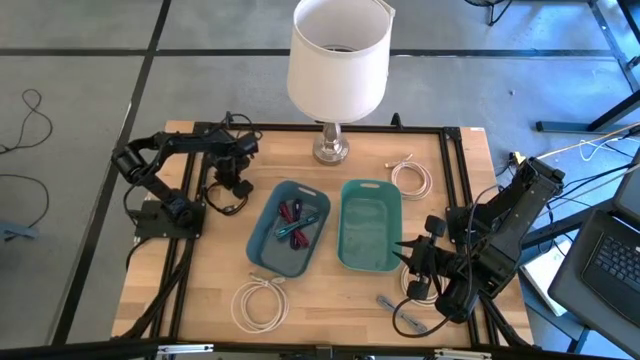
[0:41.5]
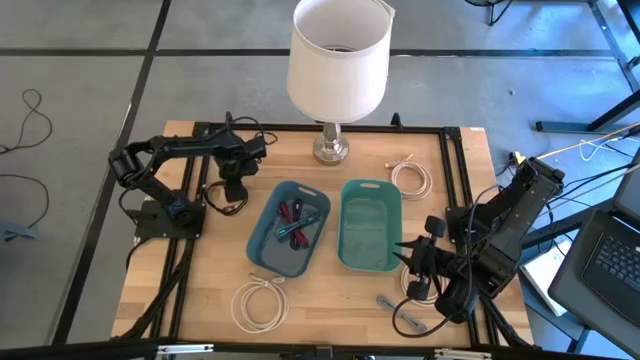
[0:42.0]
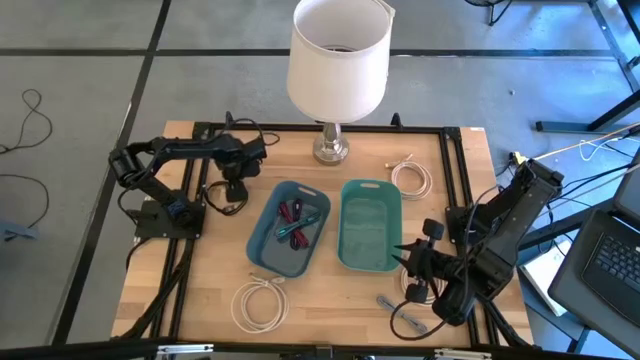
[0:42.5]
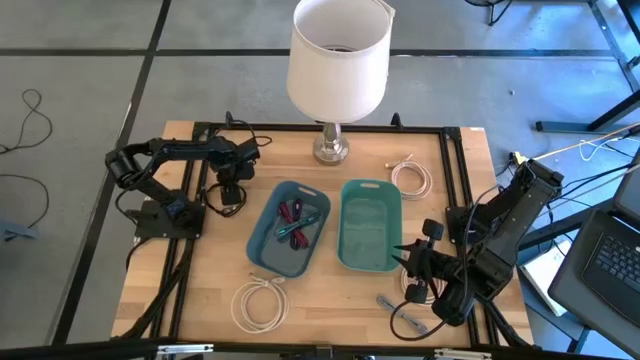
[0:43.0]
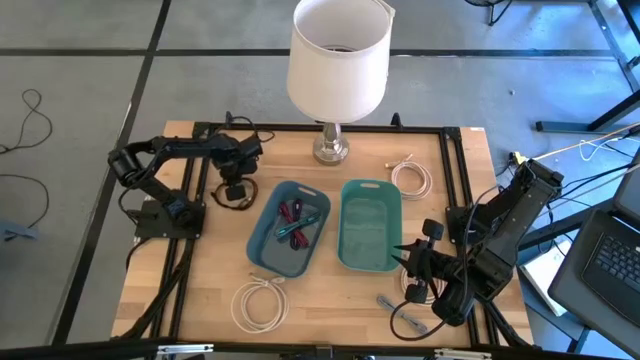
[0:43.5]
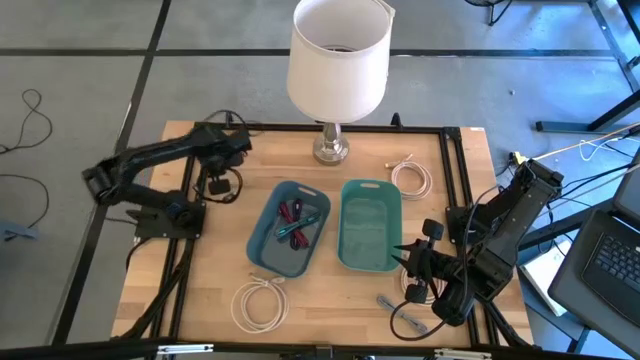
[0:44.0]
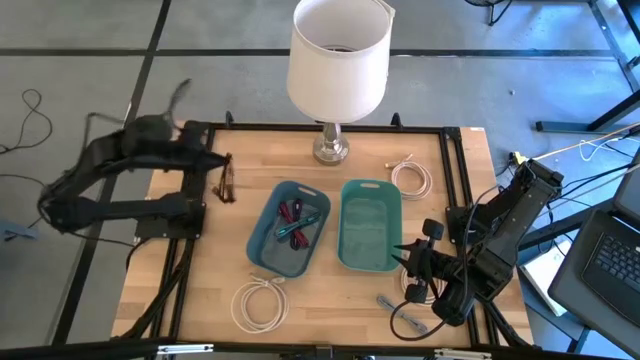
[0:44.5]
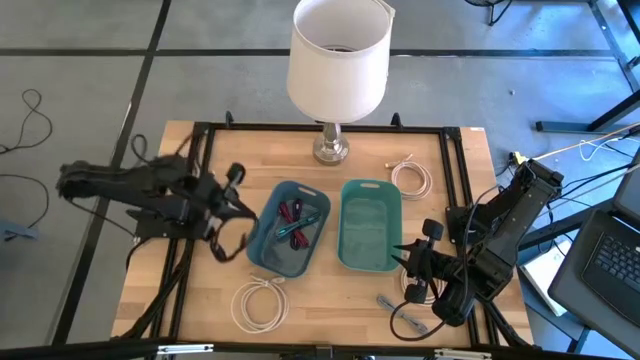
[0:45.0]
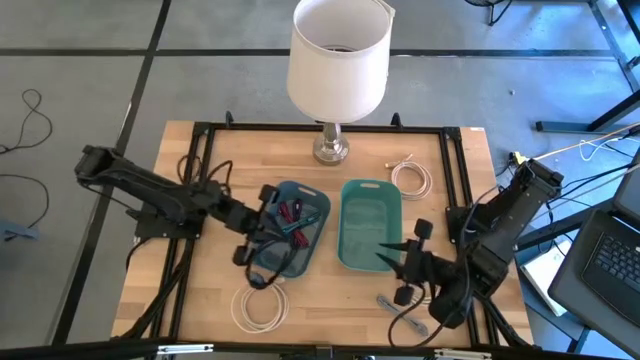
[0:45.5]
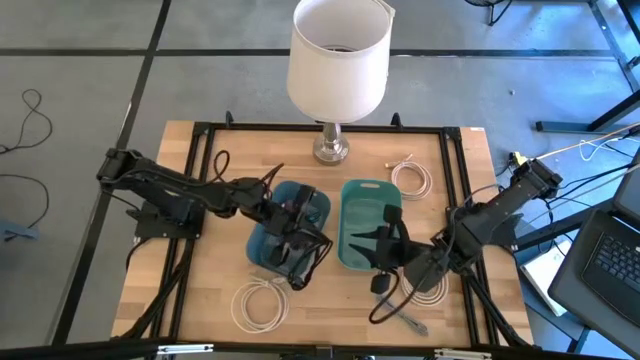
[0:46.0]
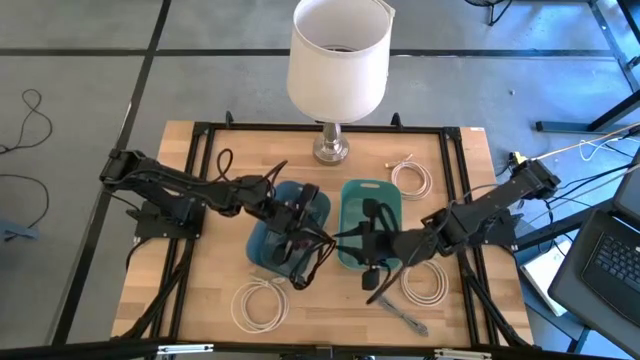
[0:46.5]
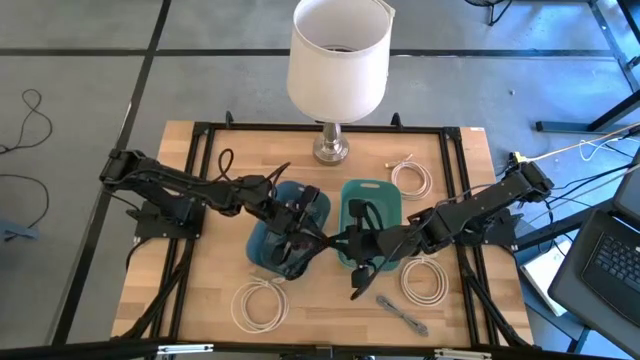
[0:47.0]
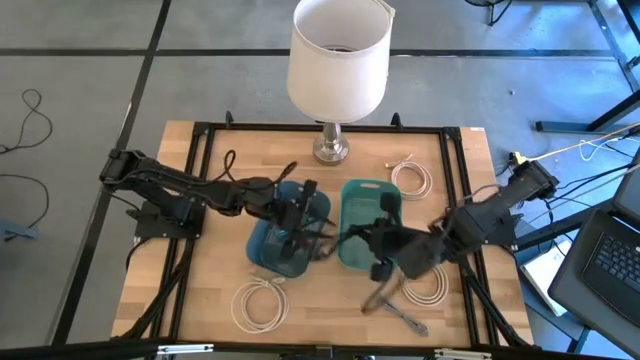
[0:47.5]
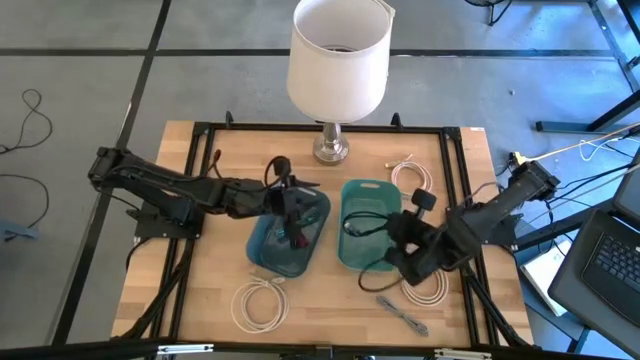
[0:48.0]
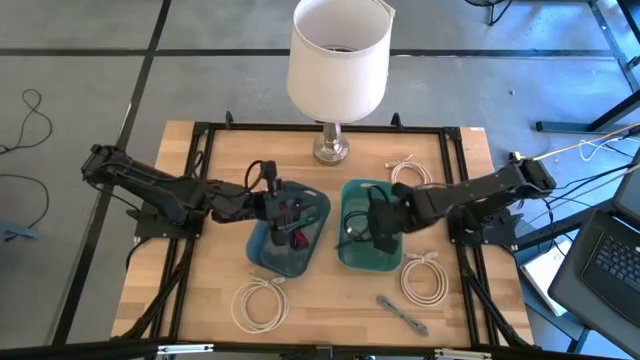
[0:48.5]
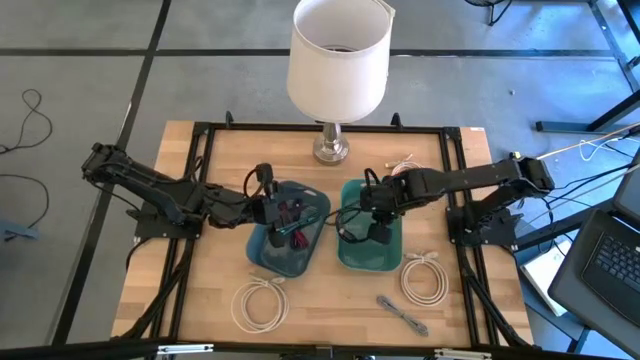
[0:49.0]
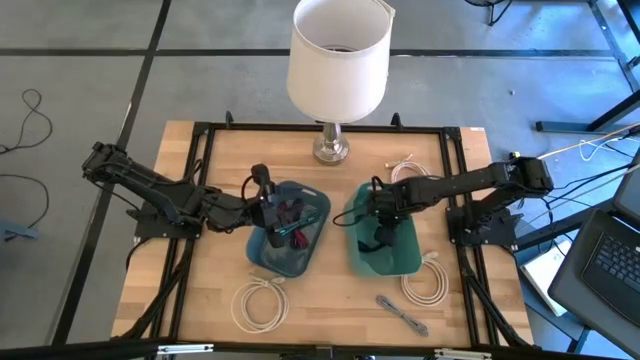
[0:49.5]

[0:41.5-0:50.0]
Task: Pick and place items into bin
Put the black charger cable into the green bin

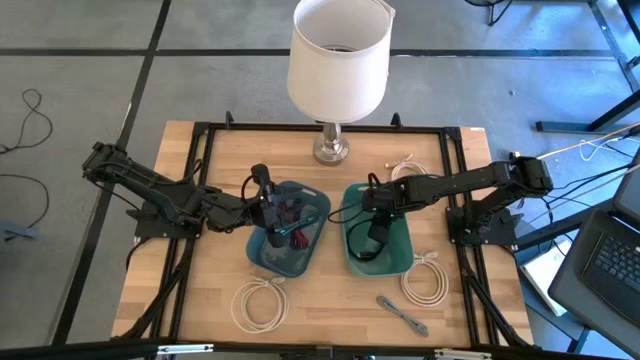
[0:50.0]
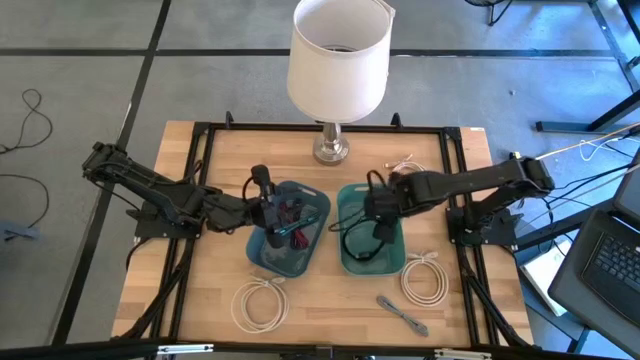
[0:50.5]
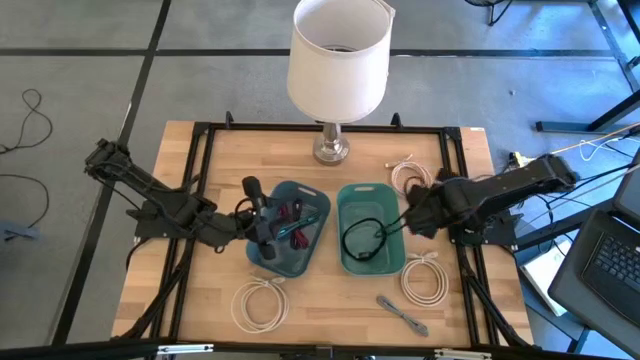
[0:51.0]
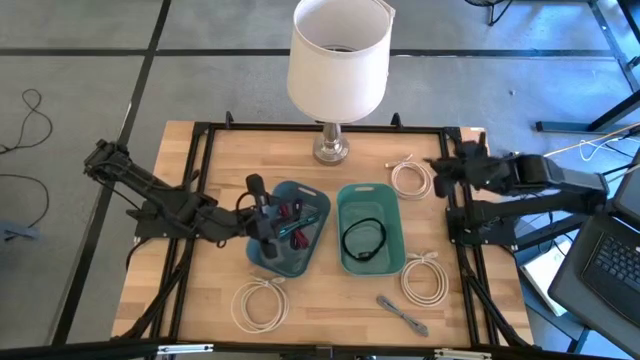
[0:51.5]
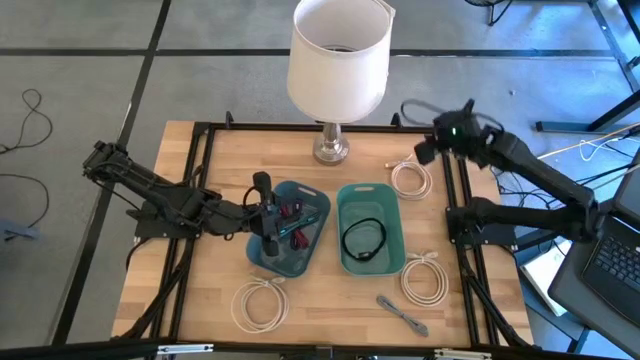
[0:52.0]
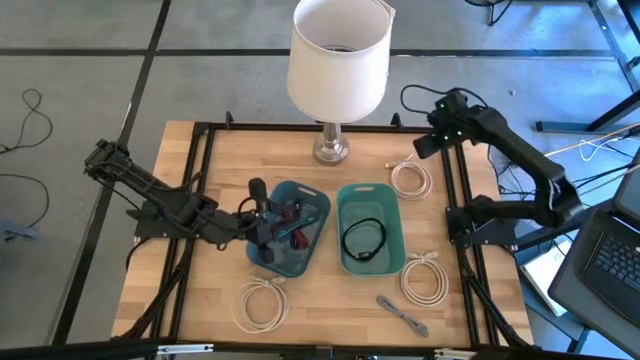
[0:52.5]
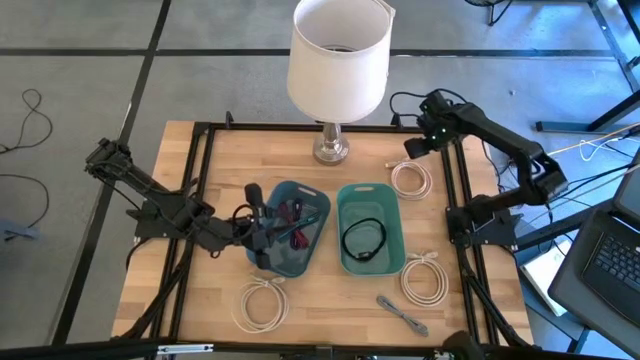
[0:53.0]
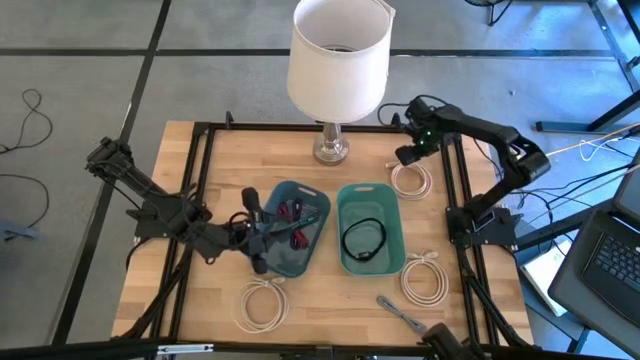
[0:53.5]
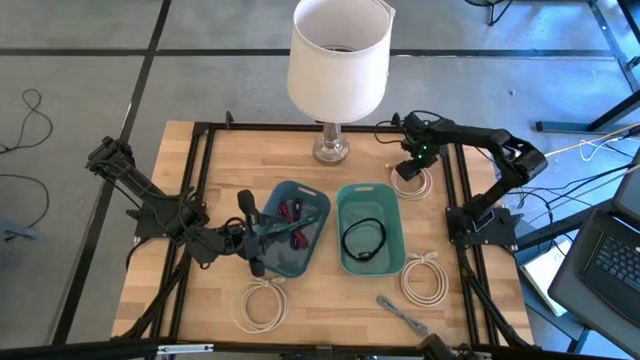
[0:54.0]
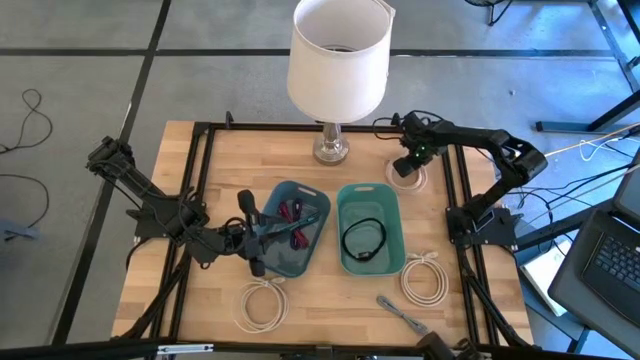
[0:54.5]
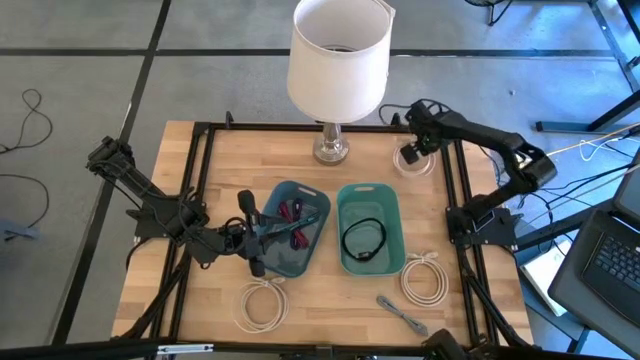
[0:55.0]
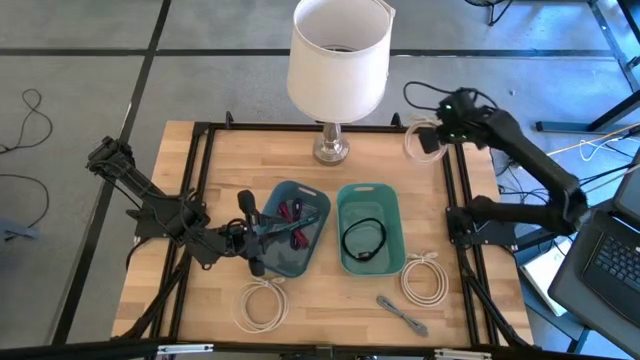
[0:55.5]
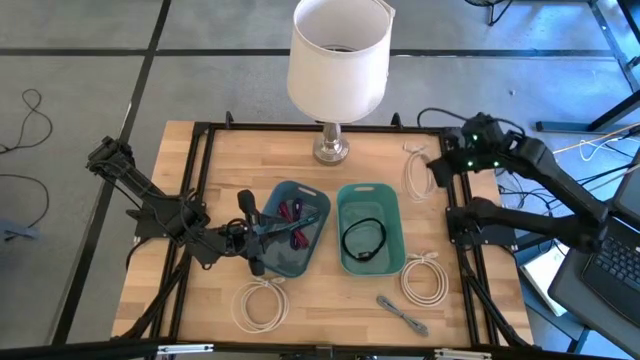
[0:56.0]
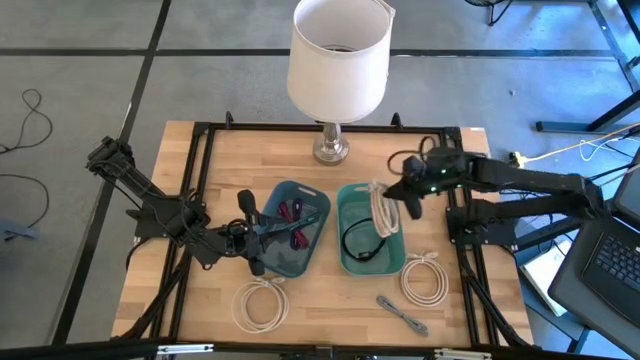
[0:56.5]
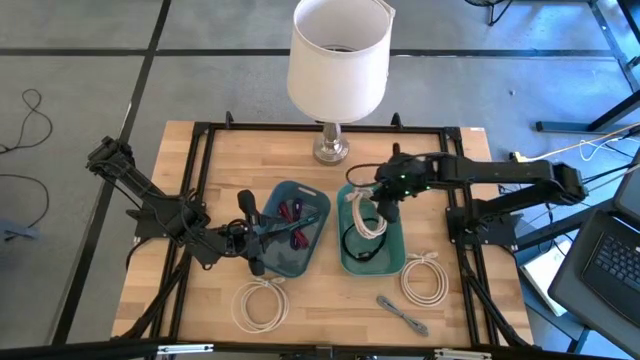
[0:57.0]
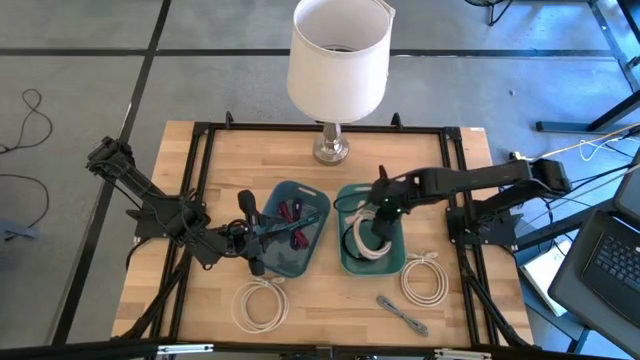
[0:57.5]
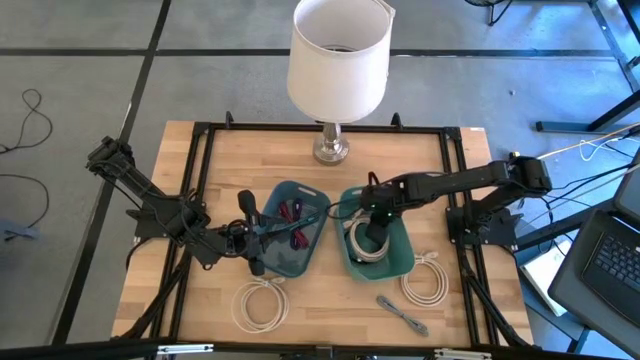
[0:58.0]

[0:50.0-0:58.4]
Put the top white HDMI cable into the green bin

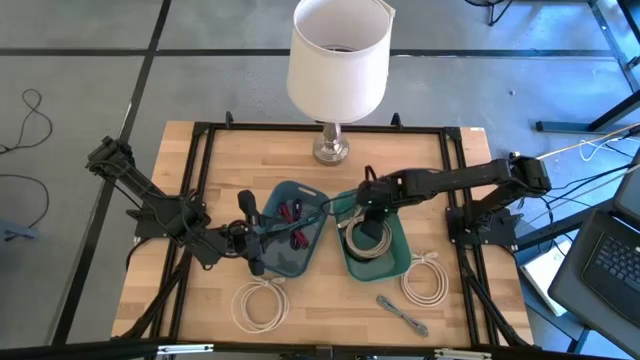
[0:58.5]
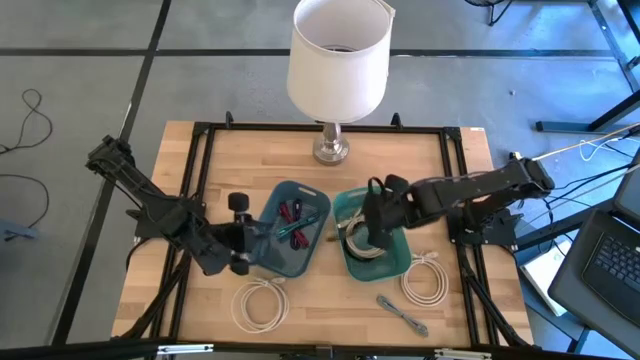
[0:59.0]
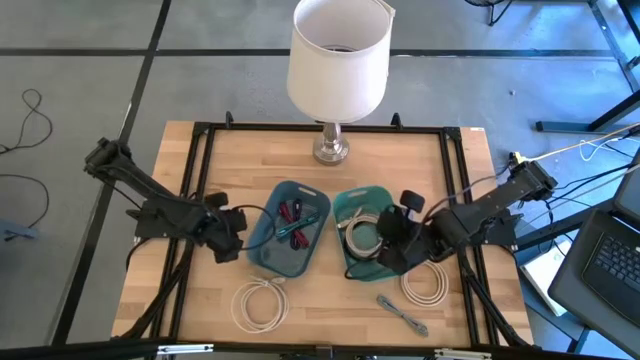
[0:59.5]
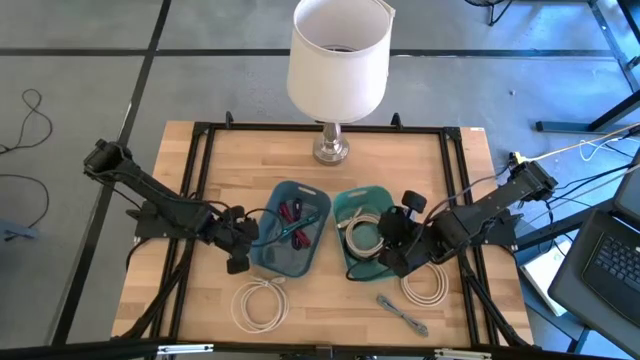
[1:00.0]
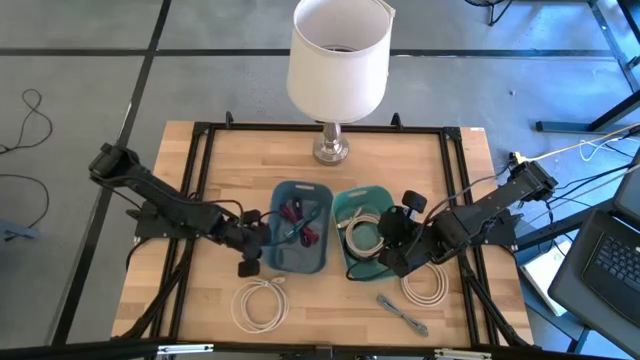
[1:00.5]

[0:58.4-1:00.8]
Adjust the blue bin on the table

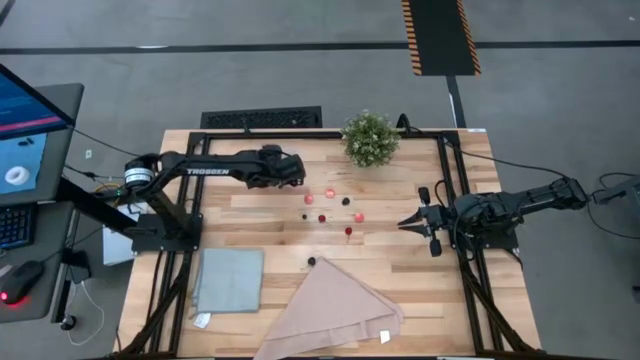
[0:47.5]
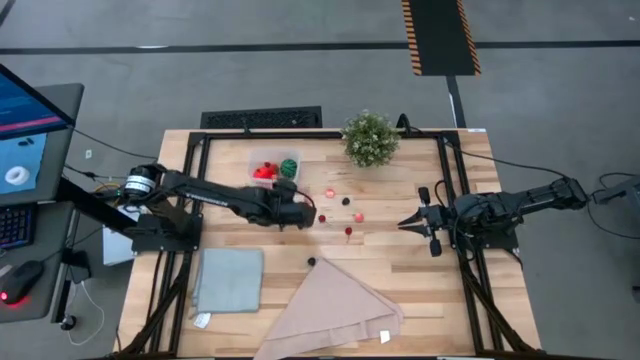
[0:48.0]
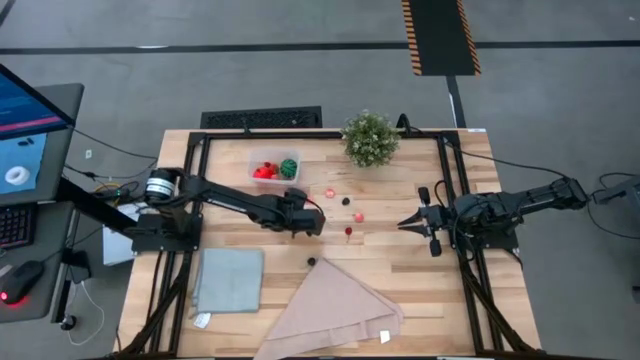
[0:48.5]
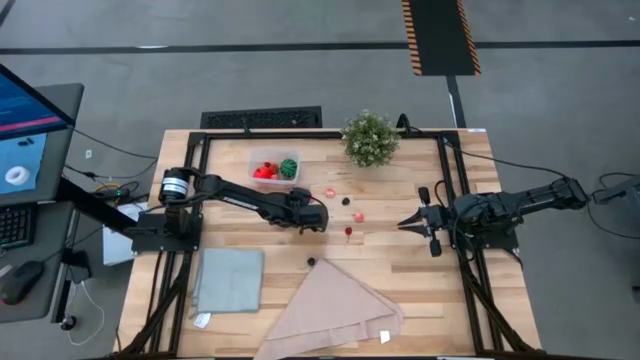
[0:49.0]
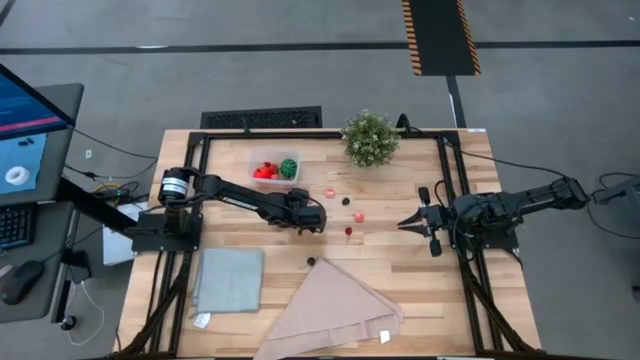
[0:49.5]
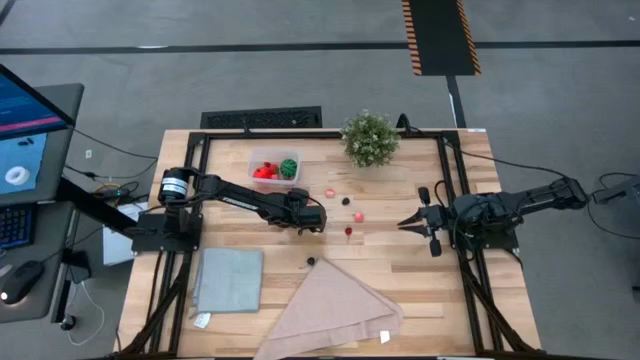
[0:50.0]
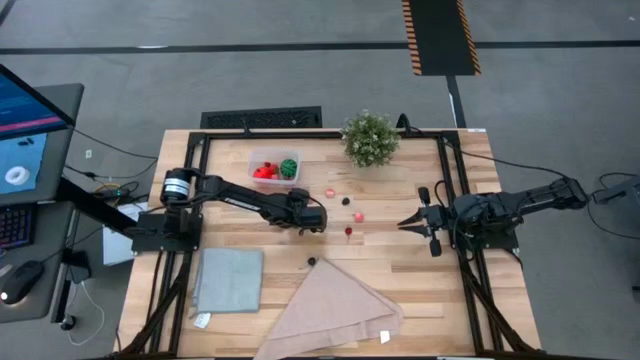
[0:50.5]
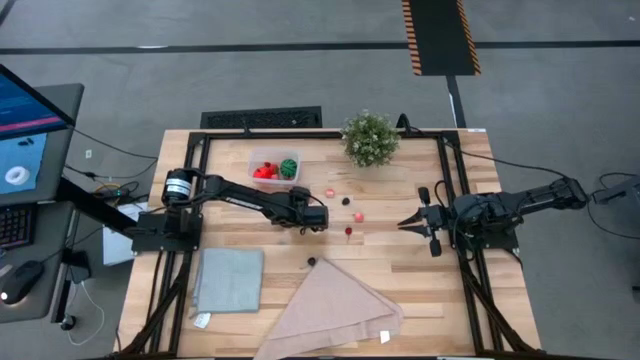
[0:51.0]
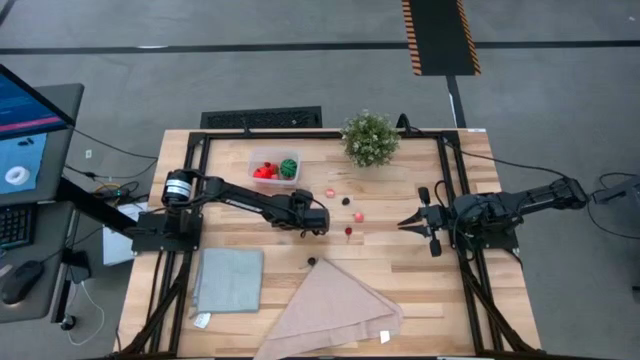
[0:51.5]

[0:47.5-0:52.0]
Task: Pick and placing Produce into tupperware
Put the blueberry into the transparent container
